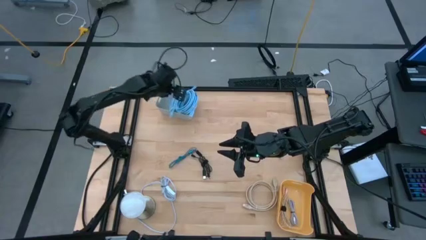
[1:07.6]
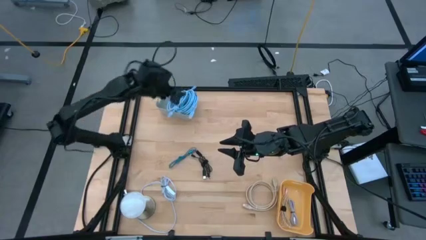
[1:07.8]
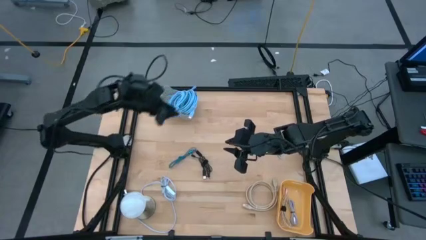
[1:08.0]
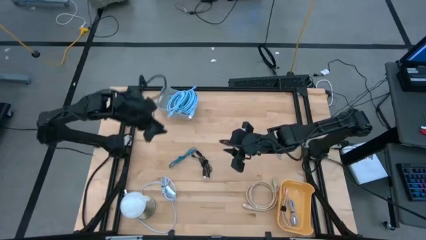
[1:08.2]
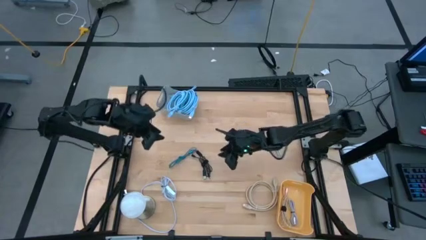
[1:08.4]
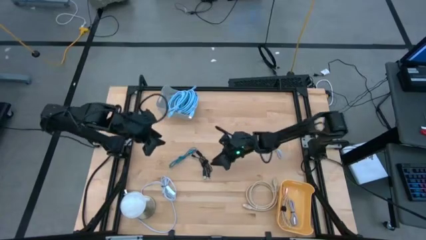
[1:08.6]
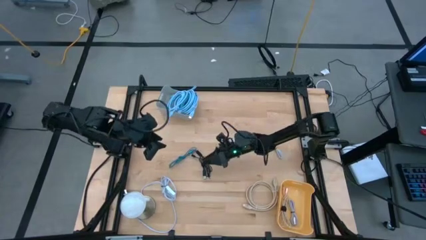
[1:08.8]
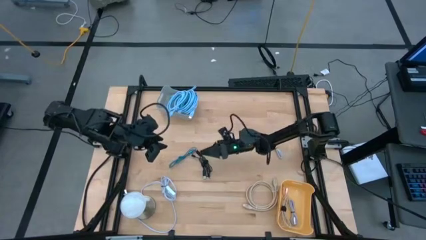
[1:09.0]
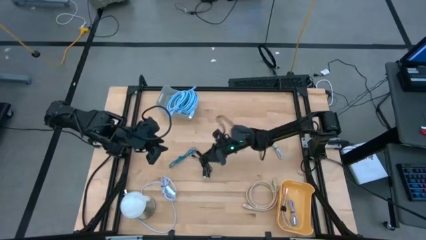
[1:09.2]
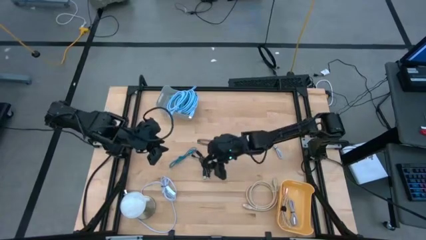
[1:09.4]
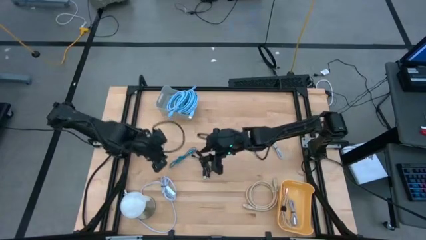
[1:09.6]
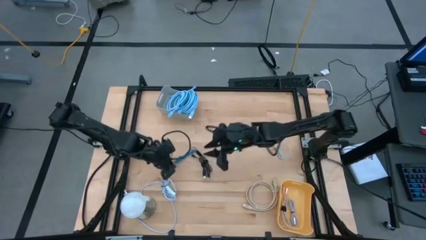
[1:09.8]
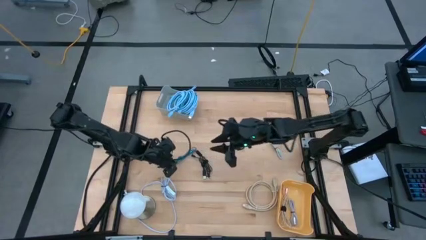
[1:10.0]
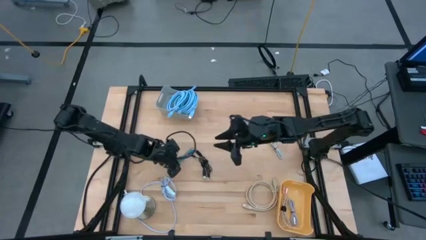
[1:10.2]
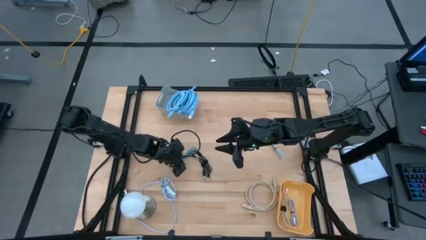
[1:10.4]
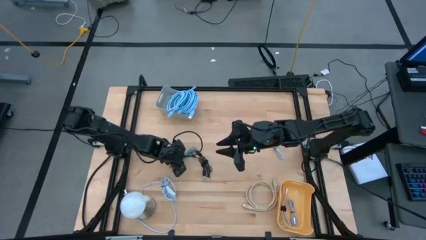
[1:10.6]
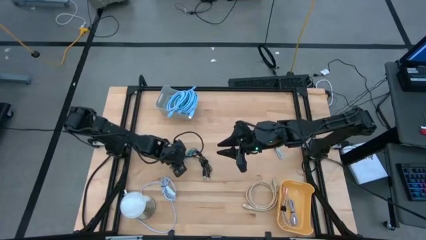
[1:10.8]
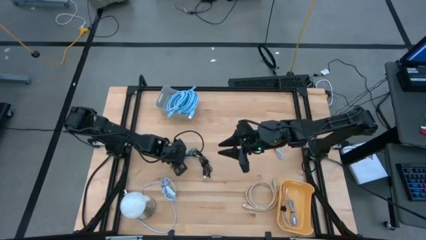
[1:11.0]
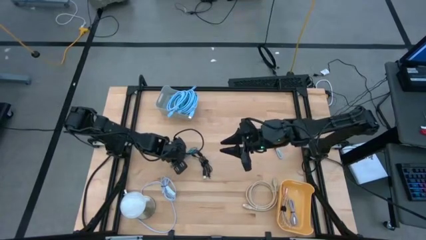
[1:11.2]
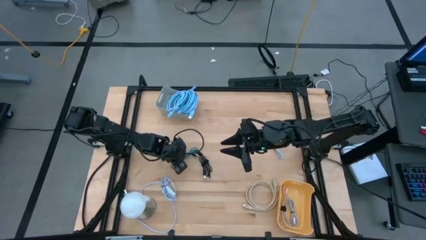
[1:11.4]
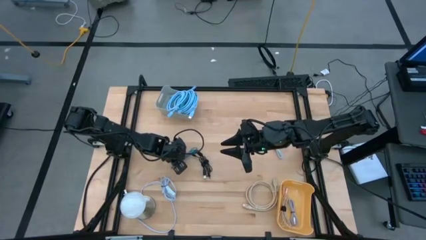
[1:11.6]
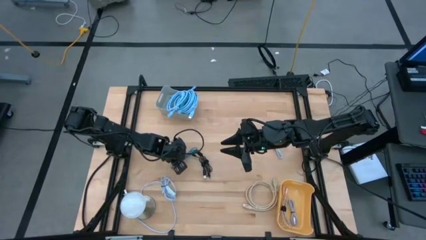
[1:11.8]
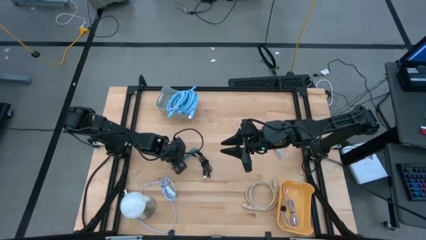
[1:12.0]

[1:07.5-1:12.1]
Task: Pick & Place USB Port
Put the dark blue charger cable into the yellow bin

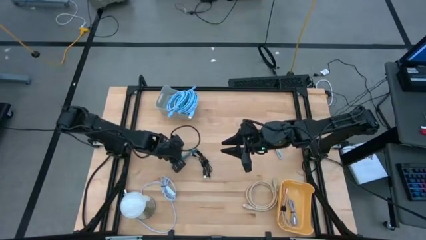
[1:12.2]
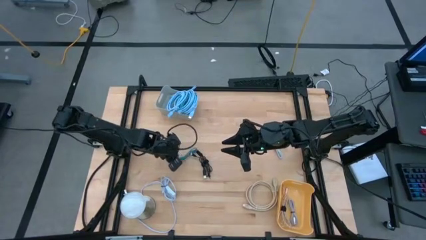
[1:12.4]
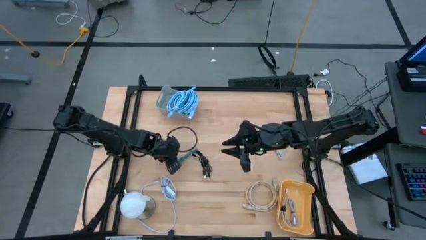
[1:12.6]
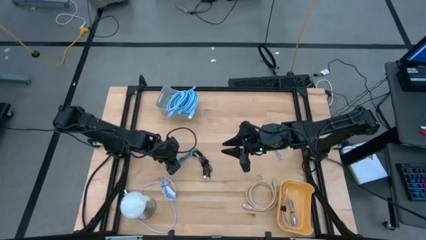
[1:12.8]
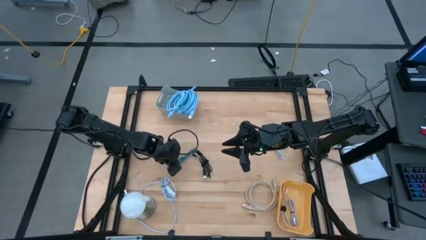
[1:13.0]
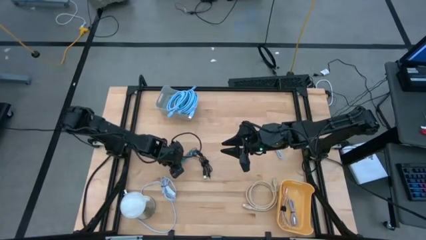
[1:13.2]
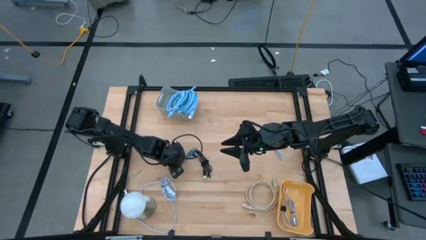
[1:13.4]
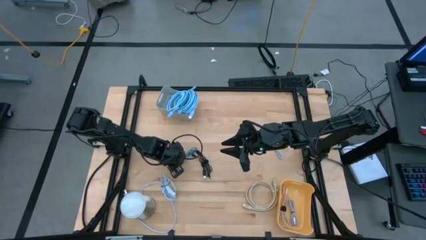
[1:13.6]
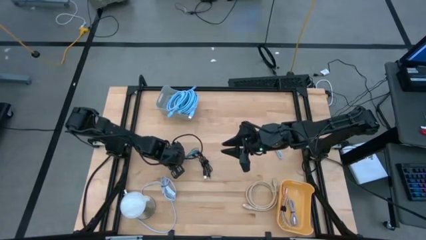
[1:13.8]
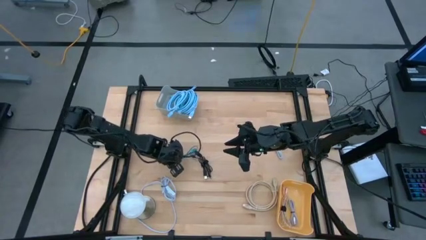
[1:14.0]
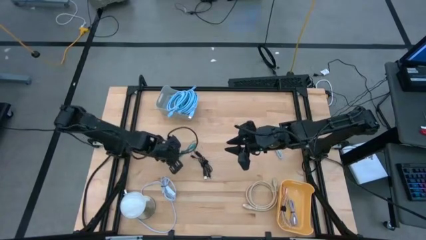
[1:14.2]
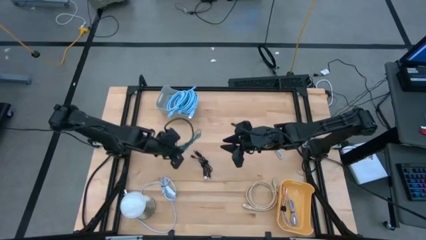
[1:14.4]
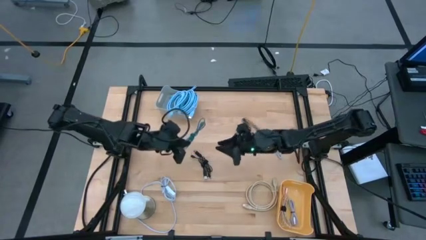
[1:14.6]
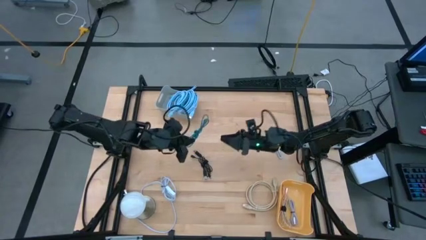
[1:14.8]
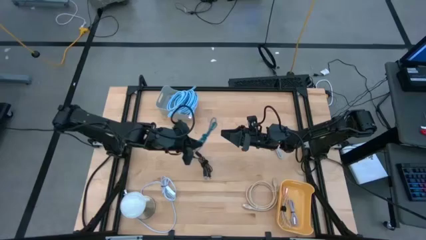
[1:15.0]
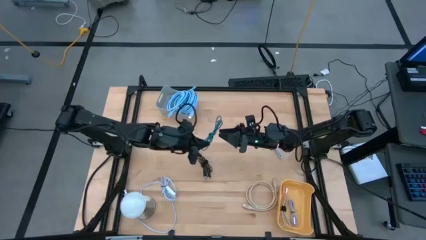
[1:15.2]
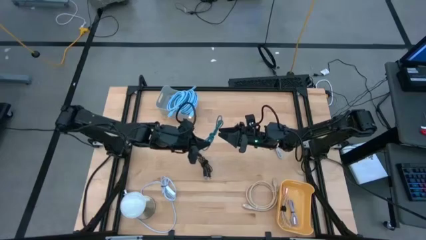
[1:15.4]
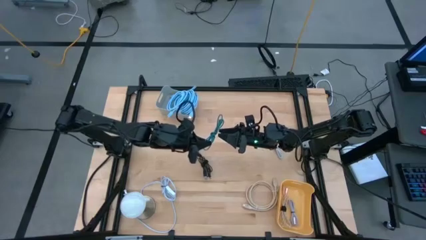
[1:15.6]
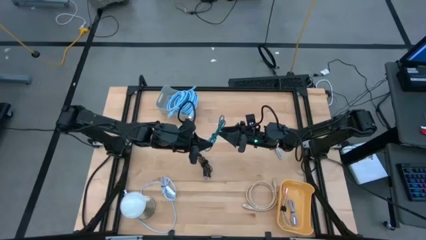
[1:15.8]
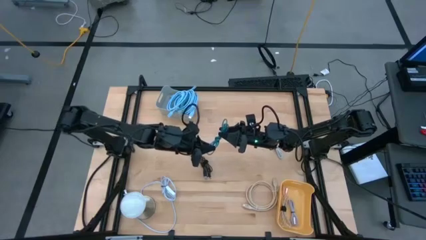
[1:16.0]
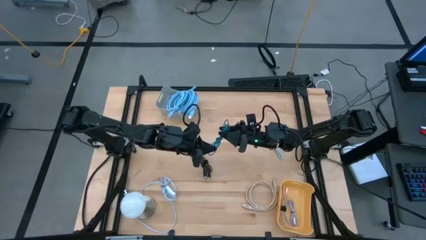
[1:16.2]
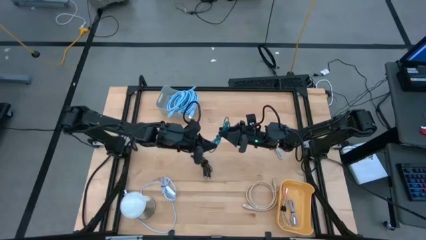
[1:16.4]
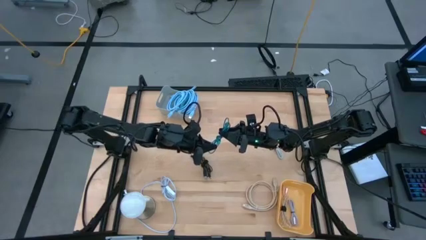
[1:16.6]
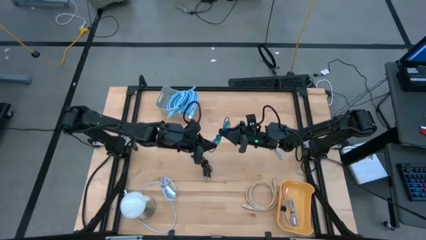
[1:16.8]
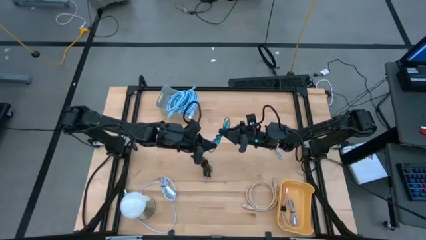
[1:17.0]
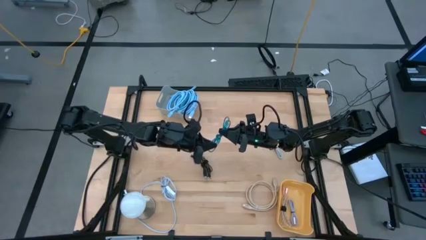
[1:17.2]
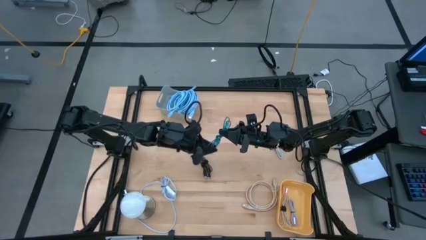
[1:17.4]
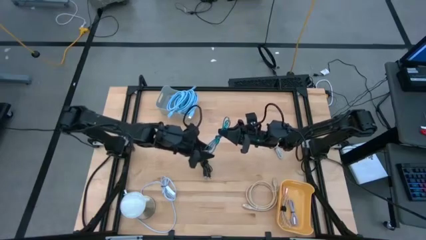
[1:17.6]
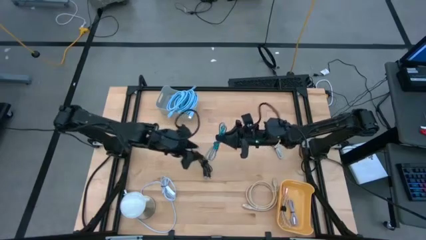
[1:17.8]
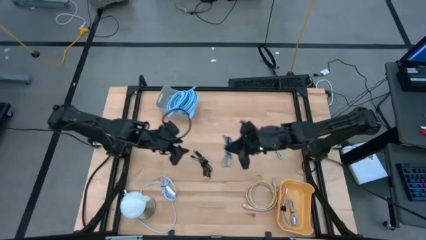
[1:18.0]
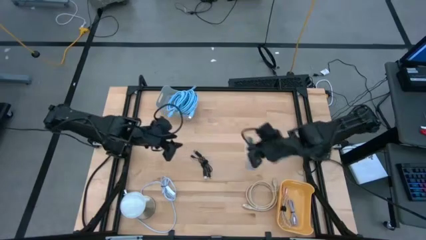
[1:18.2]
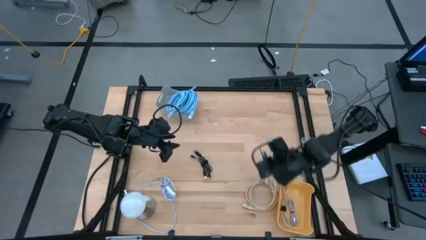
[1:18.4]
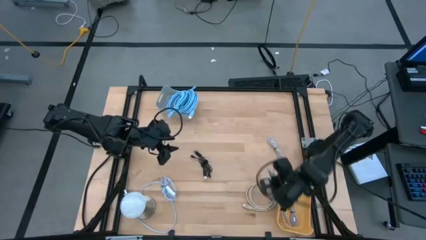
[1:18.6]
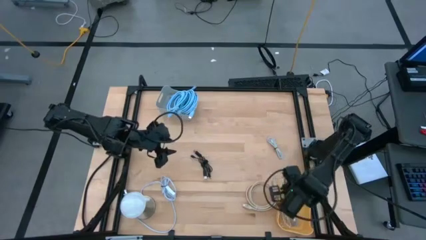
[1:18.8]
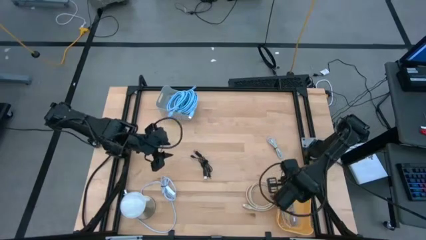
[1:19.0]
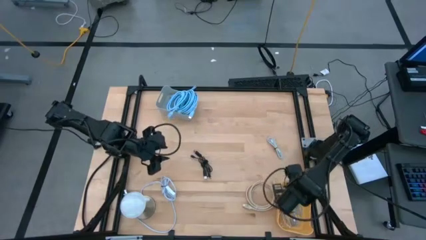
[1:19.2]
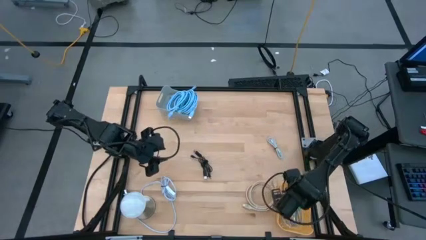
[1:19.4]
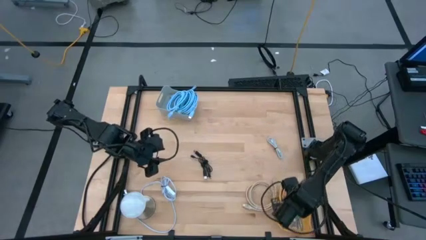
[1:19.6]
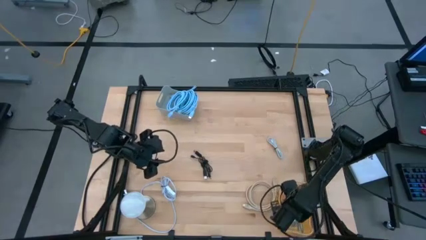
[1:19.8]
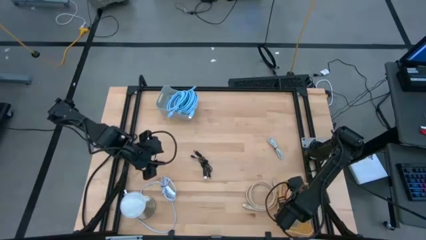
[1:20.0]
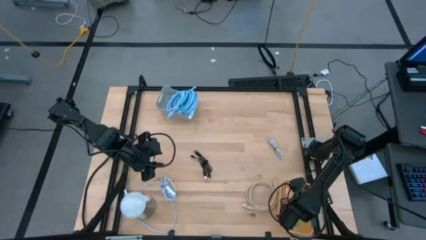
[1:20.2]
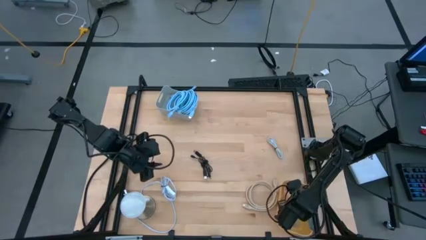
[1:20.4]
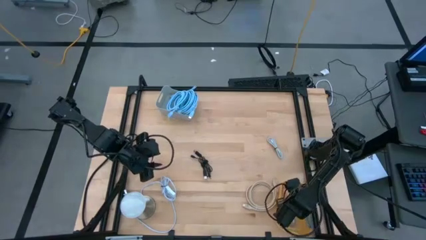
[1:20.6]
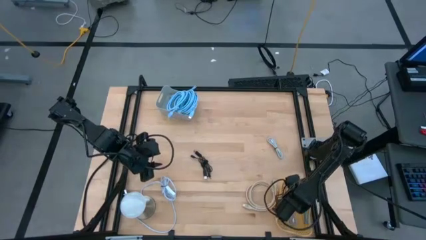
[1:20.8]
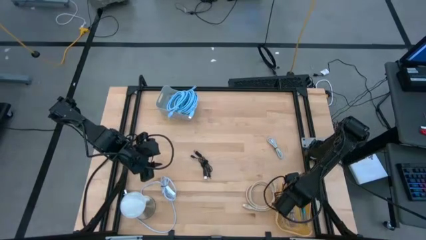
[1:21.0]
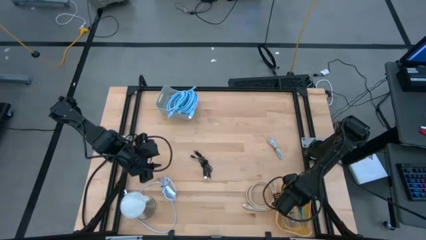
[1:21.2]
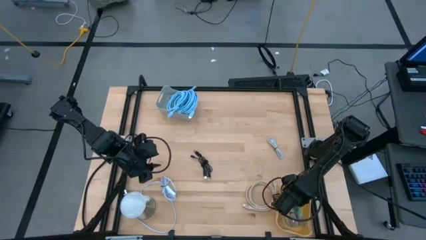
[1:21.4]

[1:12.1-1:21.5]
Put the dark blue charger cable into the yellow bin

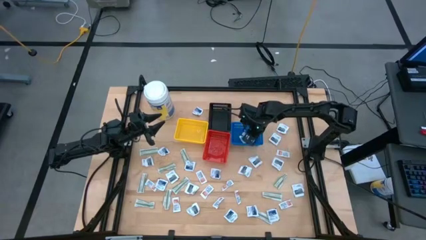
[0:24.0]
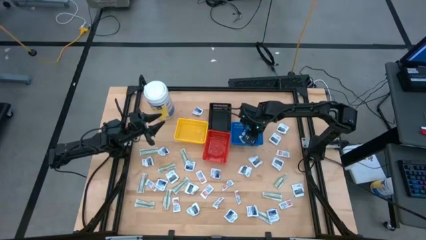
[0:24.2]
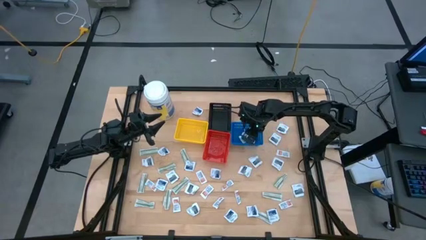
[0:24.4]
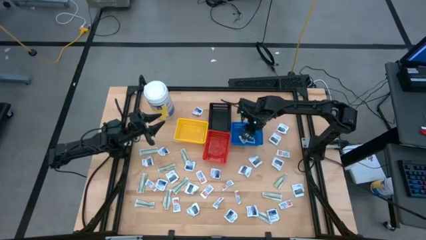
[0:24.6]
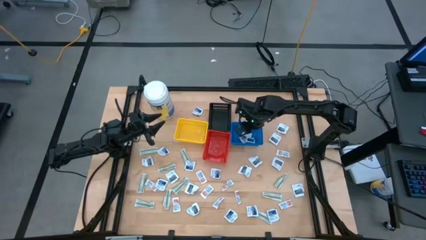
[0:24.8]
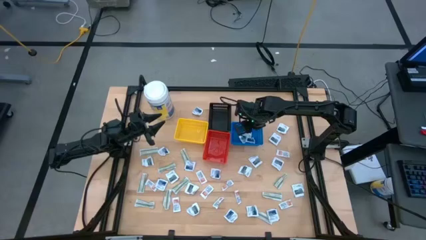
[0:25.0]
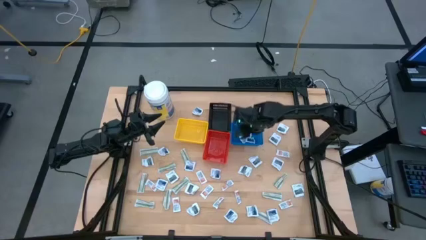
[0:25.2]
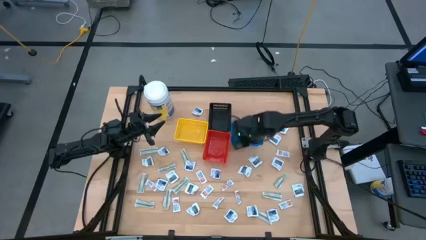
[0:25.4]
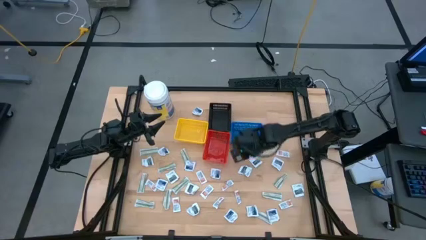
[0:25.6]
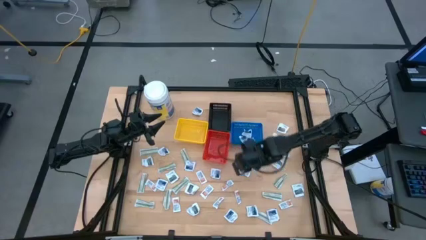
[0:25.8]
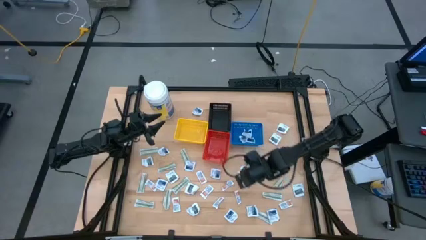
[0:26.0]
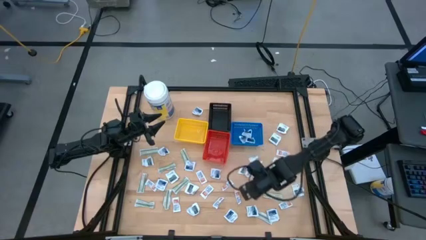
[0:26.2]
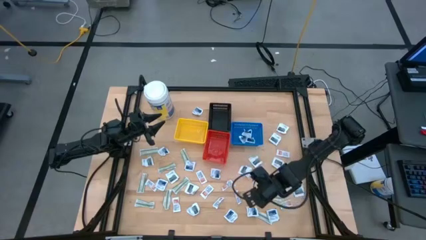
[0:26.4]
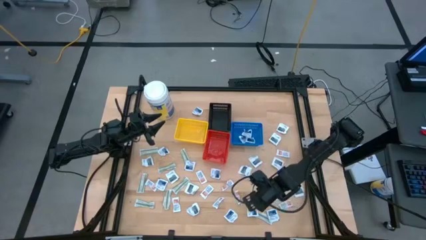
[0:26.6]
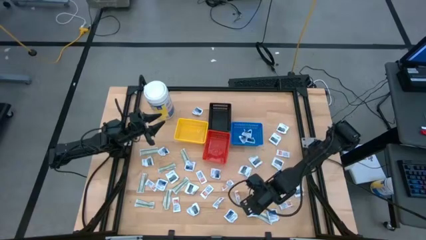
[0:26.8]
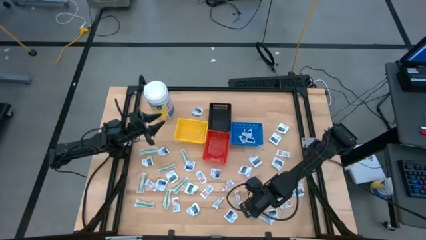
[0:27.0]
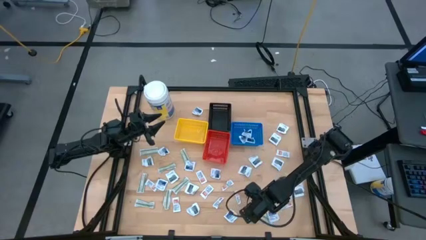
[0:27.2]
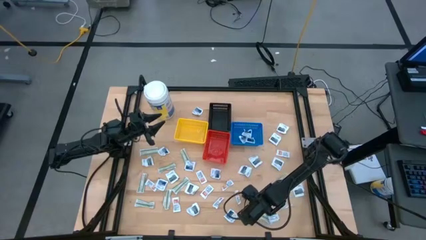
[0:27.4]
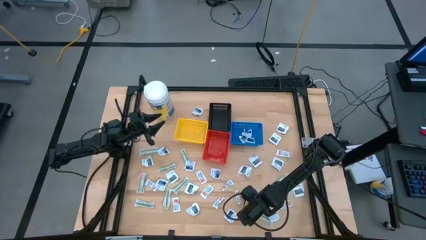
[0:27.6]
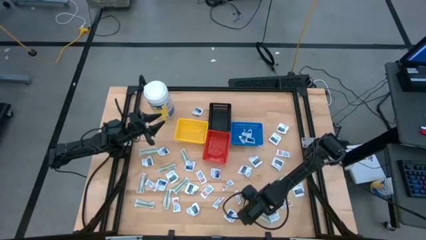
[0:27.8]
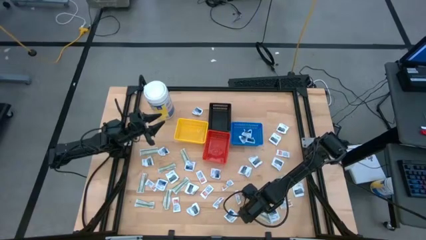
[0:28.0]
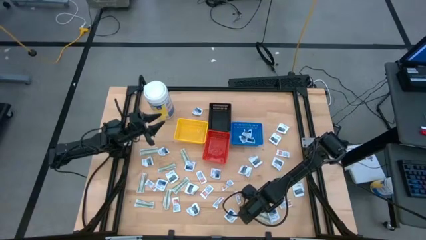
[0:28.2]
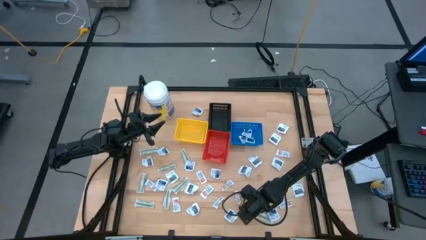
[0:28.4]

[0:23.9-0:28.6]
Task: Pick & Place First Aid Supplies
Put the alcohol pad into the blue bin
